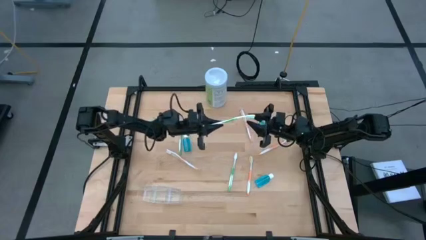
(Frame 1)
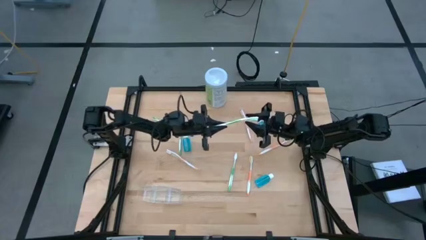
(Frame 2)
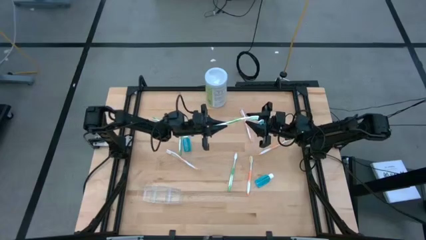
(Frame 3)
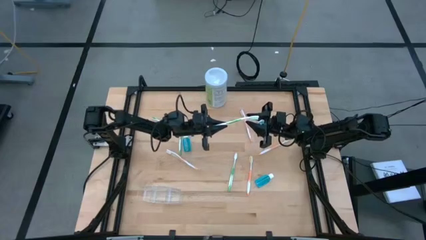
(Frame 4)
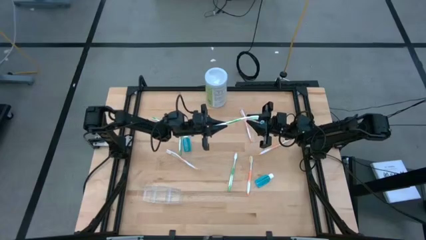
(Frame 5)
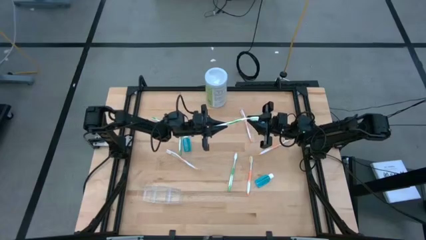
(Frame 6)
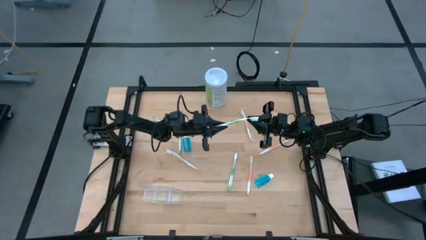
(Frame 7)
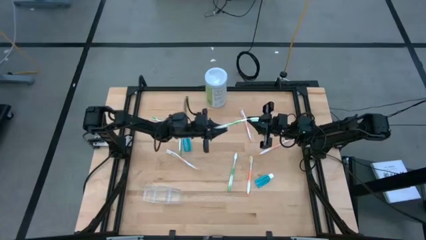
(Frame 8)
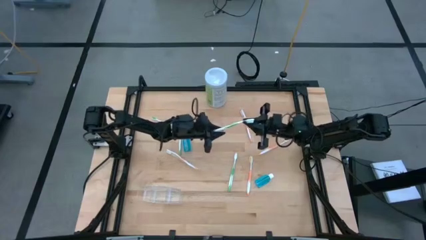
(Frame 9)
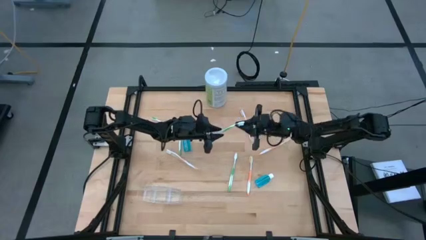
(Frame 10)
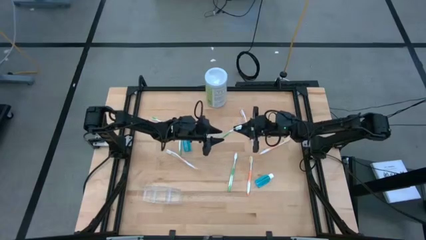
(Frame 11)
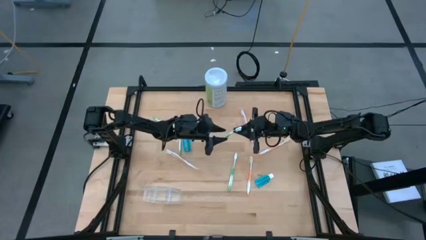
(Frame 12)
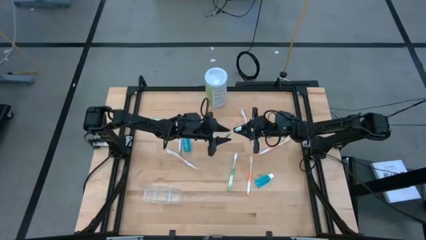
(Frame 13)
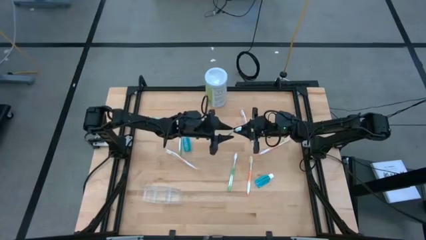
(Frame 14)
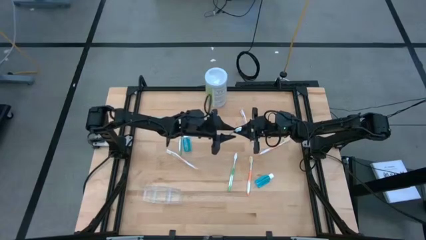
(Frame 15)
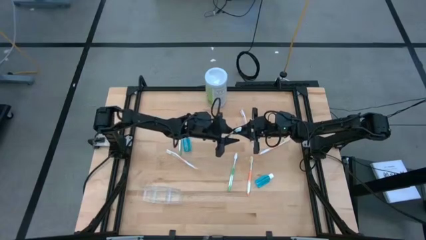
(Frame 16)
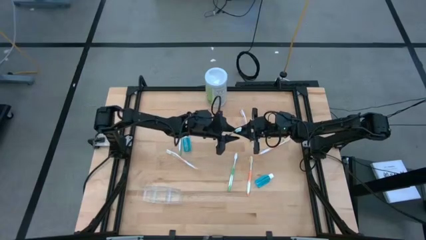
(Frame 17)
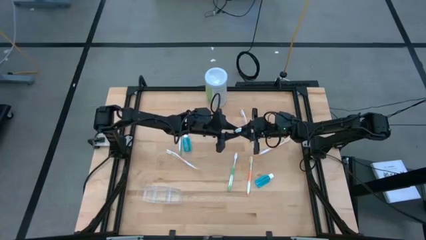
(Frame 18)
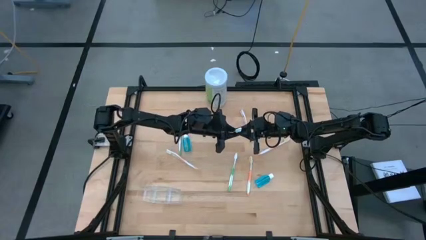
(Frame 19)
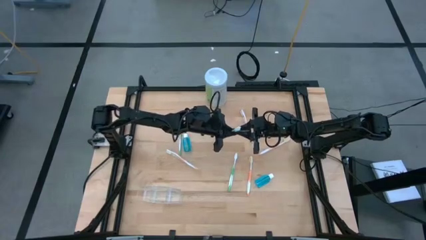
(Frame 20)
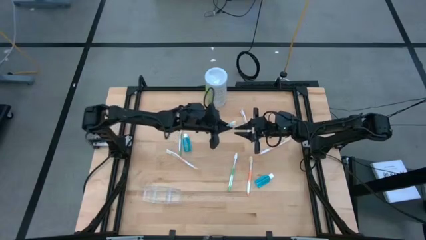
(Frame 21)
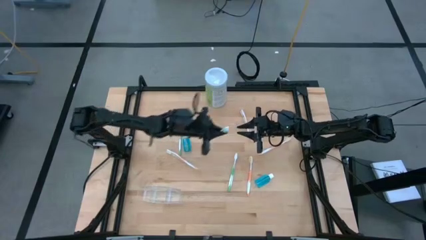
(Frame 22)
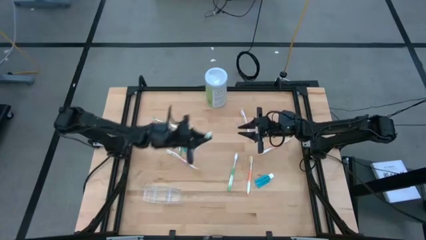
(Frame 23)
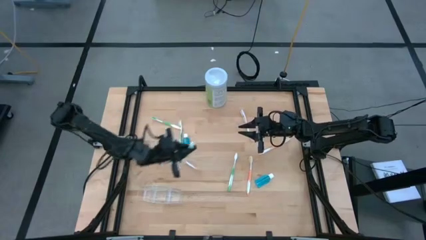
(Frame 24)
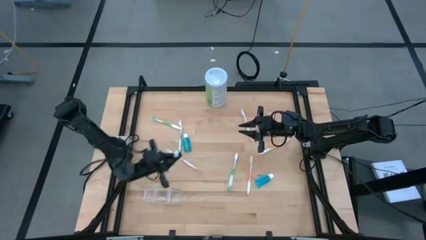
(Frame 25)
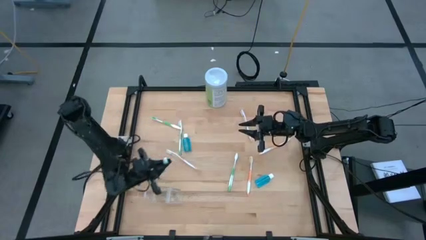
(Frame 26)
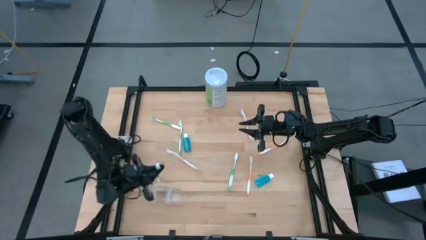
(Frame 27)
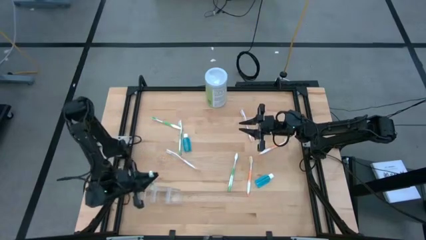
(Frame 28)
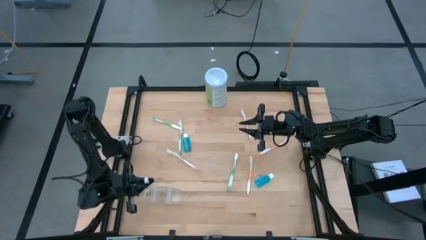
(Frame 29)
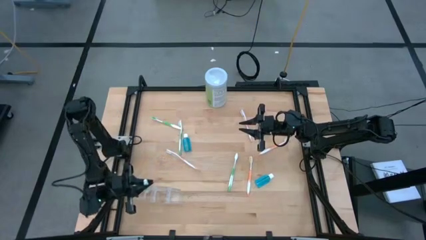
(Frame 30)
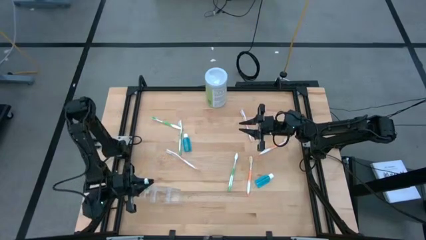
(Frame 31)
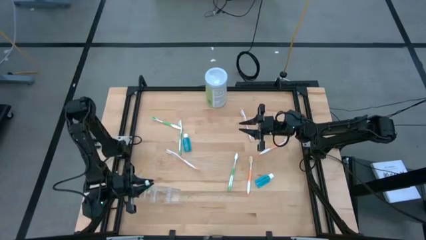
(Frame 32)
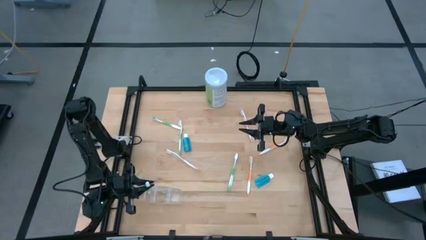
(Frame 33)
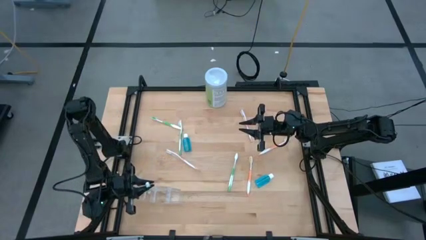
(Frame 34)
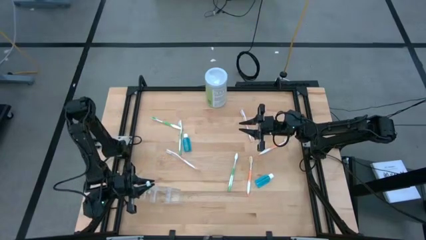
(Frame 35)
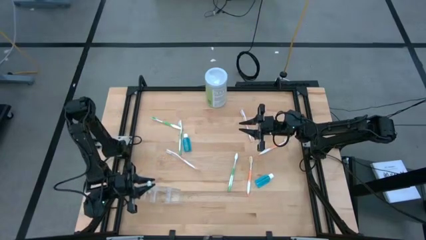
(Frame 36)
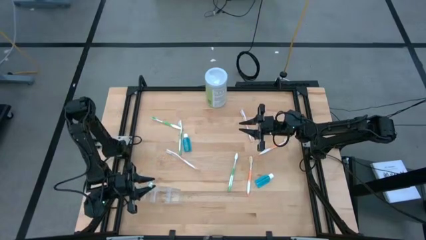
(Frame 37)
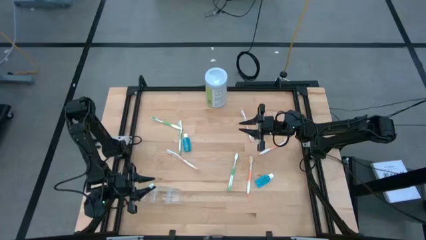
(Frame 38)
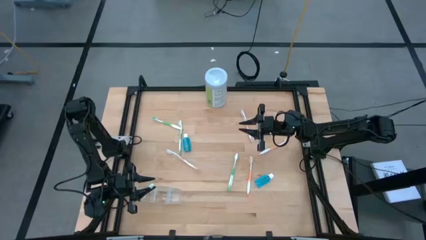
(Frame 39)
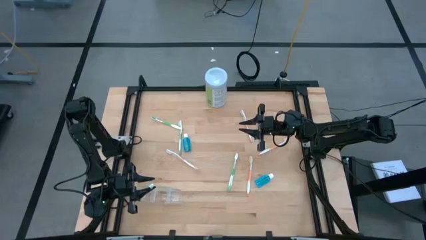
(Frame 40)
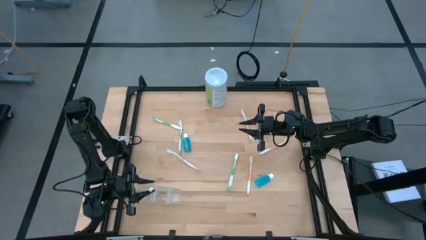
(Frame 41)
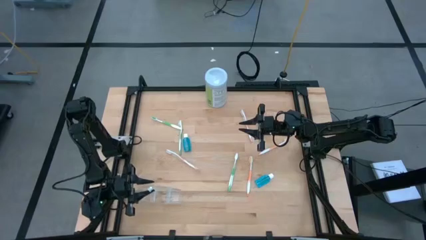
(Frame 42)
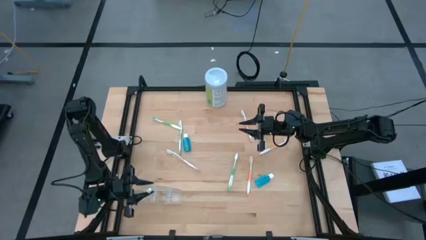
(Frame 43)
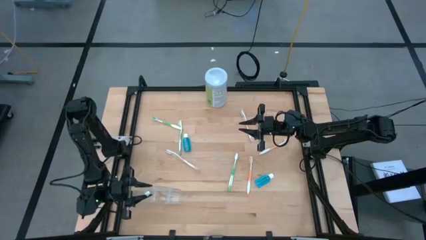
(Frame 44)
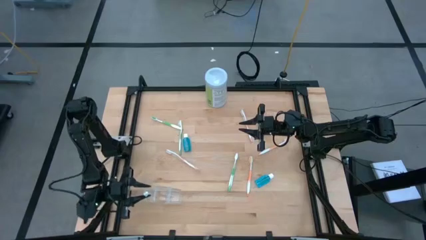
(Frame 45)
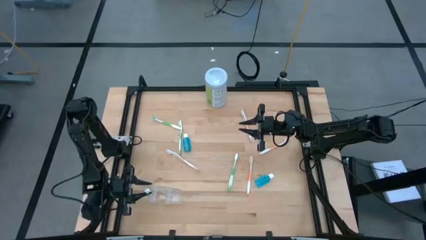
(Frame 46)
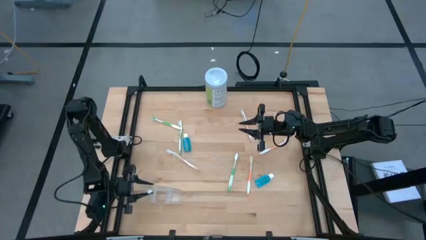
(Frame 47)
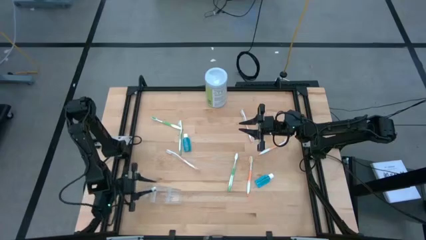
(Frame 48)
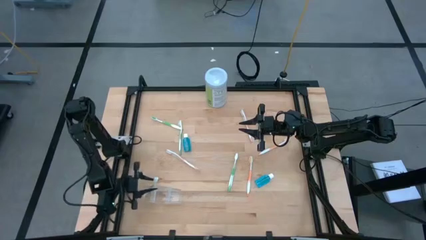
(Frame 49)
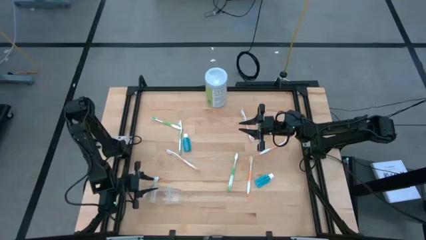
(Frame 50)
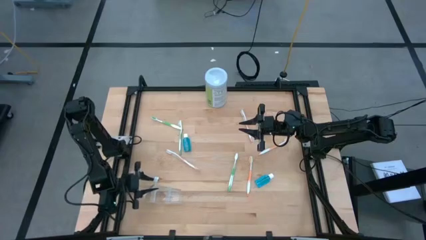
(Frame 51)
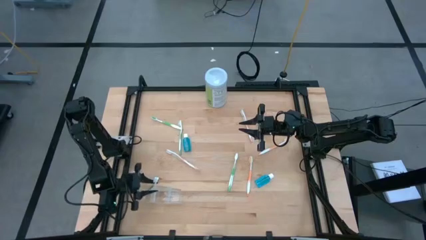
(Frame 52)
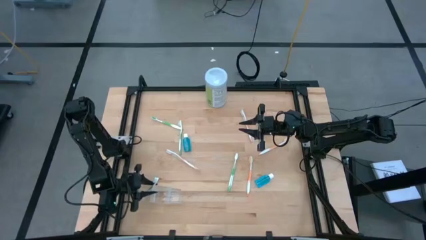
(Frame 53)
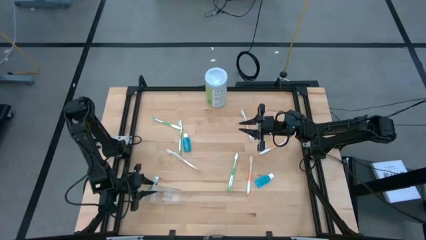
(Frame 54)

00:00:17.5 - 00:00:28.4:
Task: Pick & Place toothbrushing station
Put the green toothbrush into the transparent organizer

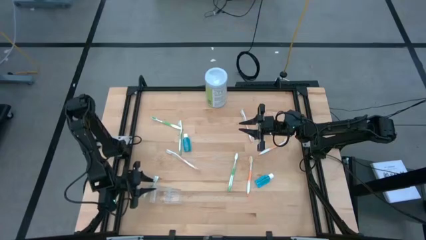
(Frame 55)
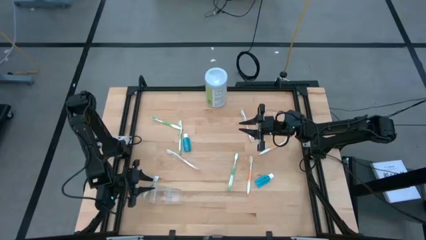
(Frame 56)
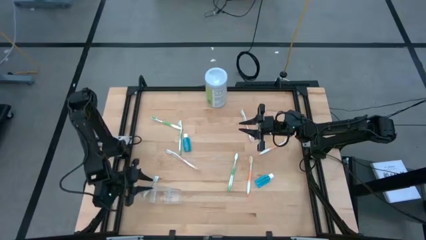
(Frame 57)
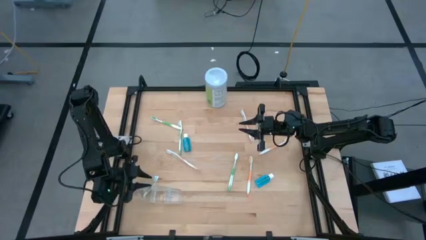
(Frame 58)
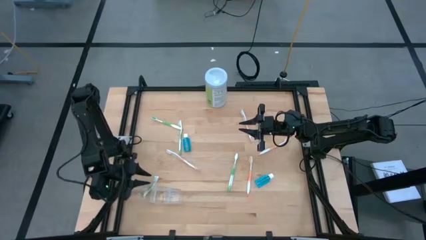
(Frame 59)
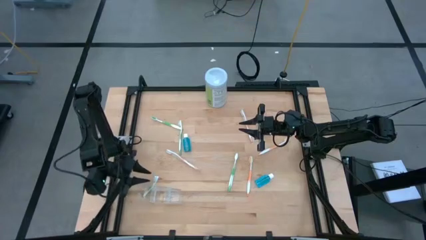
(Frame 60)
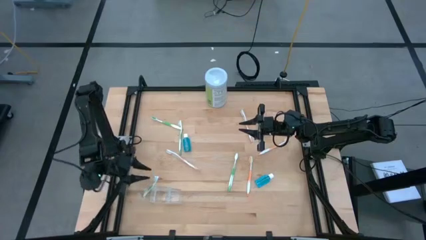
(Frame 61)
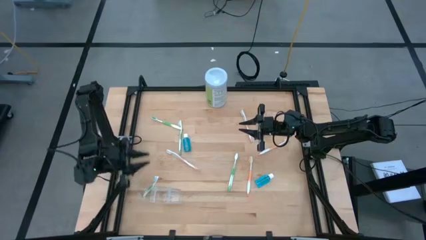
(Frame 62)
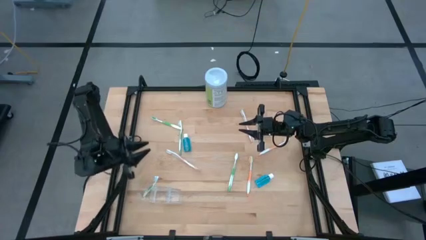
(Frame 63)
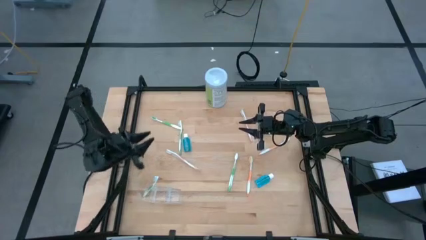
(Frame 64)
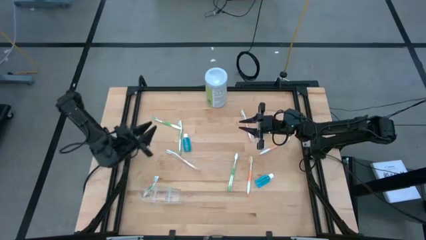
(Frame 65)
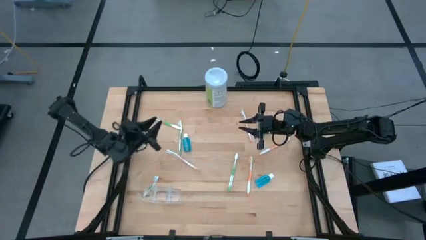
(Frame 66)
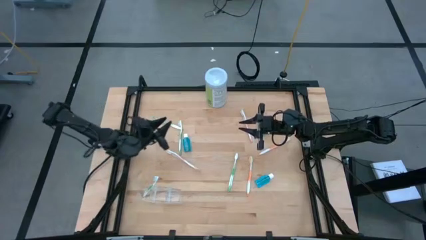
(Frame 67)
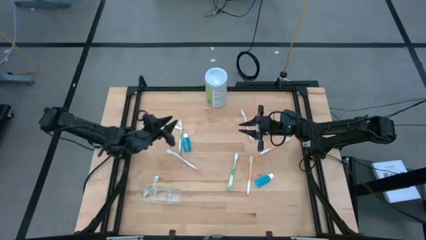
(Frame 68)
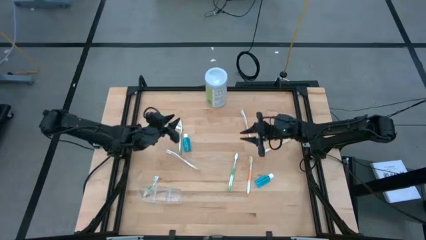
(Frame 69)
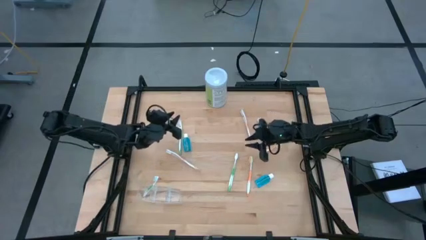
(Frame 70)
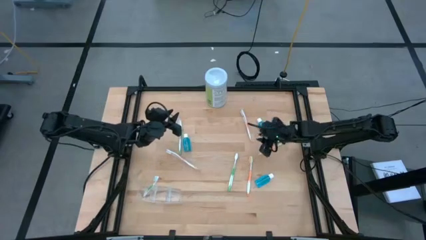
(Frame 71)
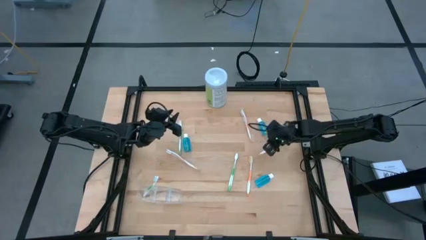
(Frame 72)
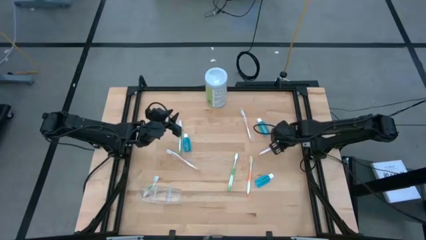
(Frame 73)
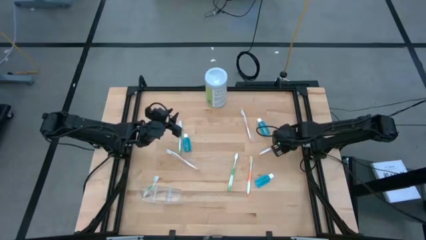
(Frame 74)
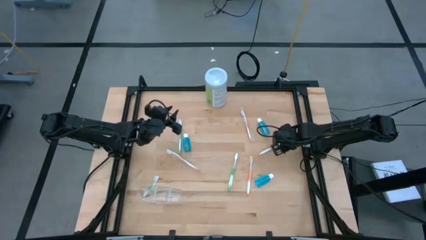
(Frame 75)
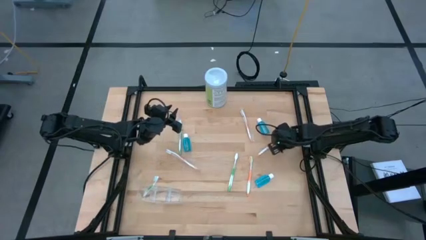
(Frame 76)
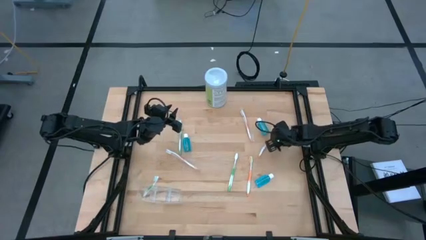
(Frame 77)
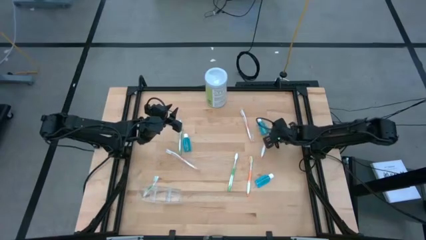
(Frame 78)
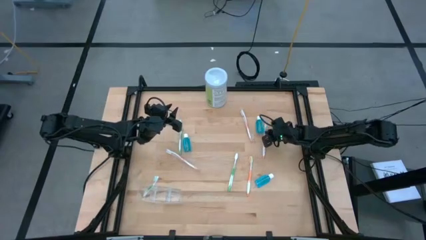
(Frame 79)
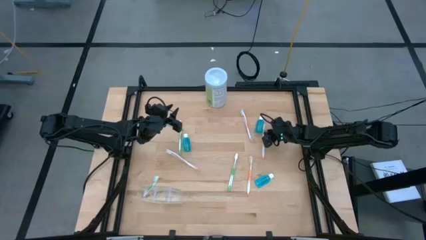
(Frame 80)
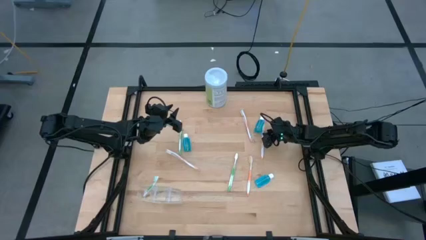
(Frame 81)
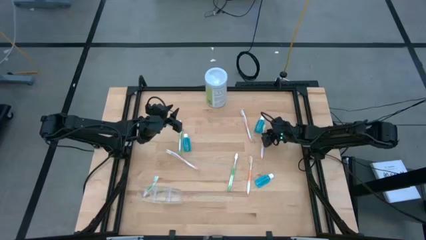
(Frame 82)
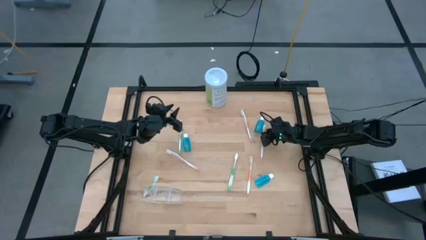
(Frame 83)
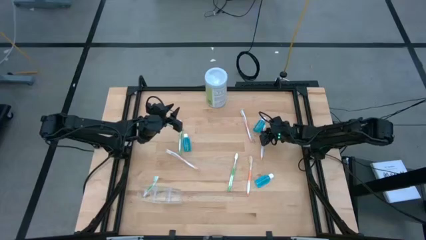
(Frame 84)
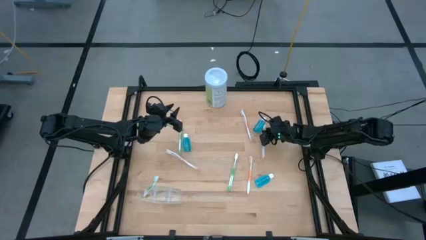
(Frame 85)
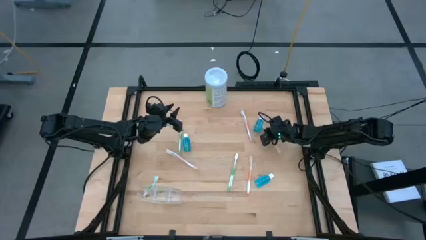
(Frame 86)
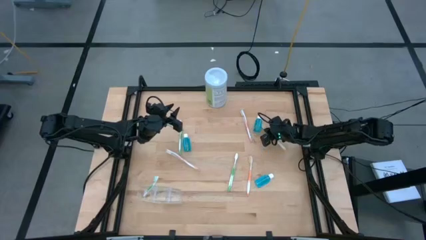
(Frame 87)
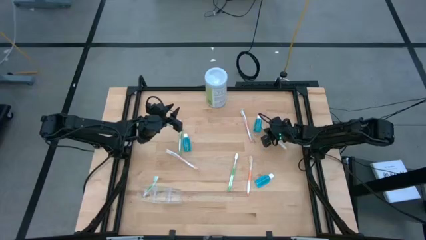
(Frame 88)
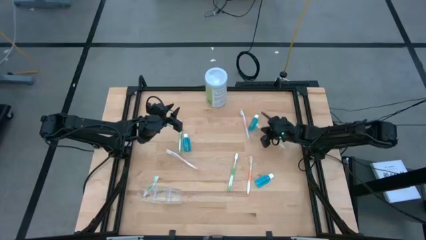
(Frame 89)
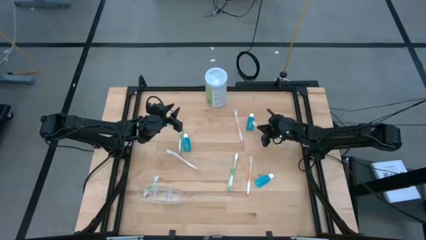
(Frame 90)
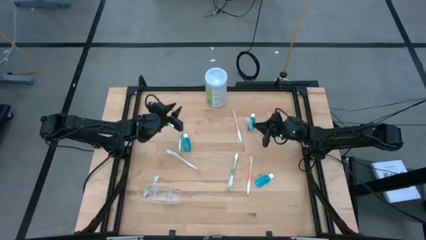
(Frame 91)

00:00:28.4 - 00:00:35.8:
Put the orange toothbrush into the transparent organizer
